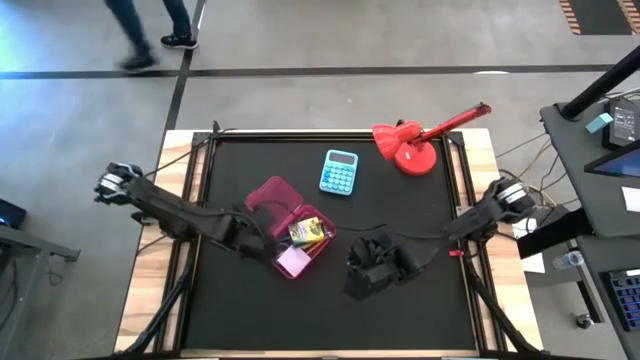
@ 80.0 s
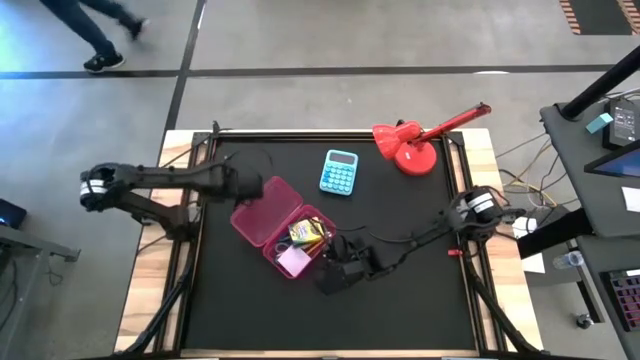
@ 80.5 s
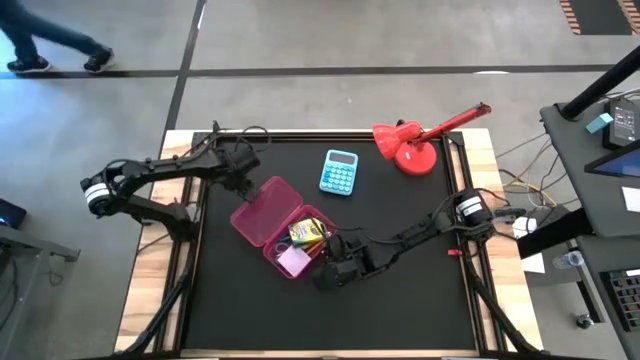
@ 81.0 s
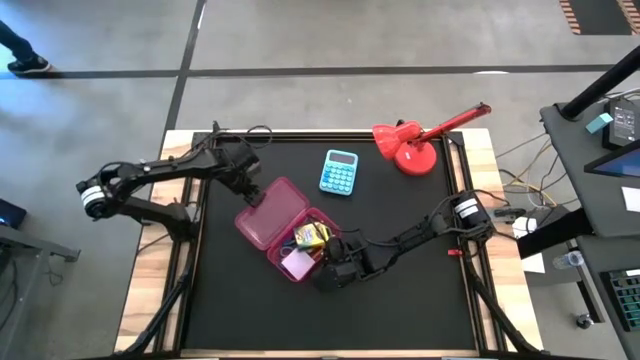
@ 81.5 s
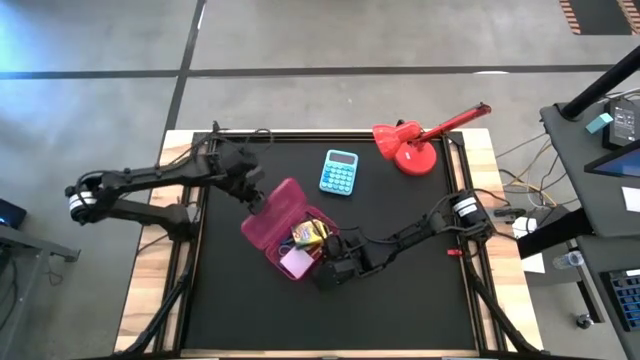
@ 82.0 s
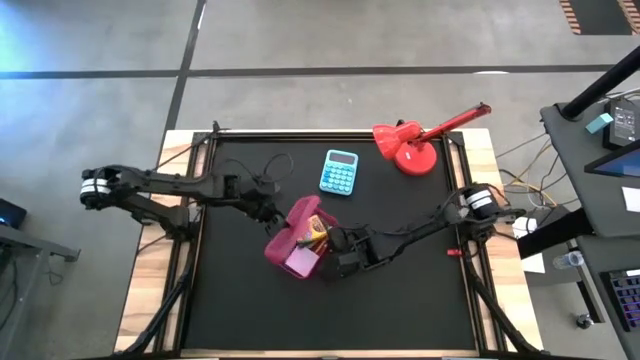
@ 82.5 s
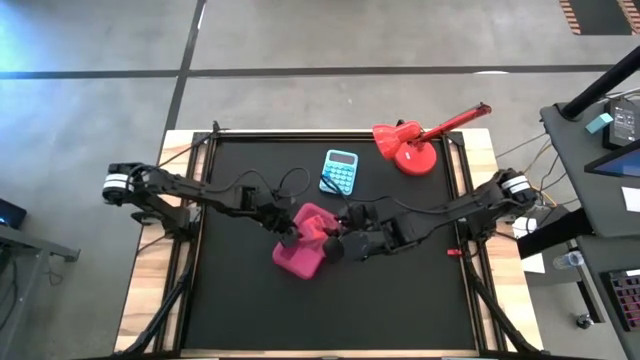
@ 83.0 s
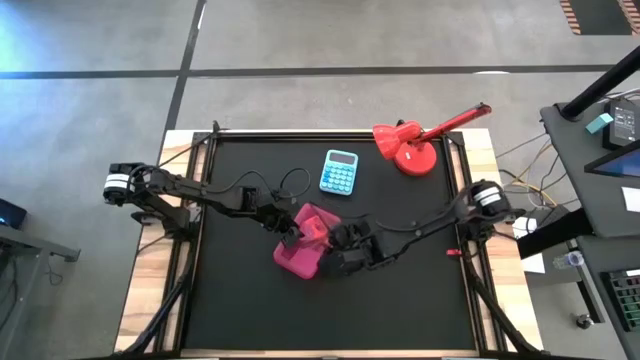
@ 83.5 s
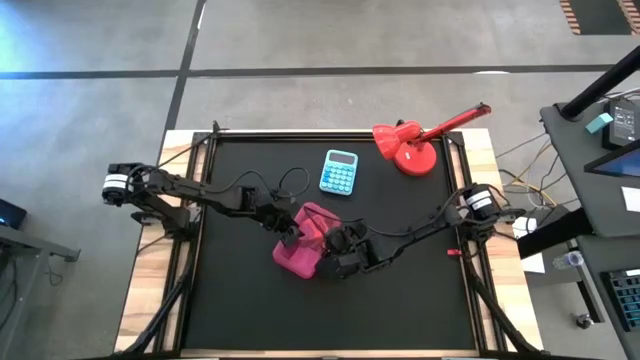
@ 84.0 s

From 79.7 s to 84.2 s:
Task: Pack school essentials
Close the pink supply box

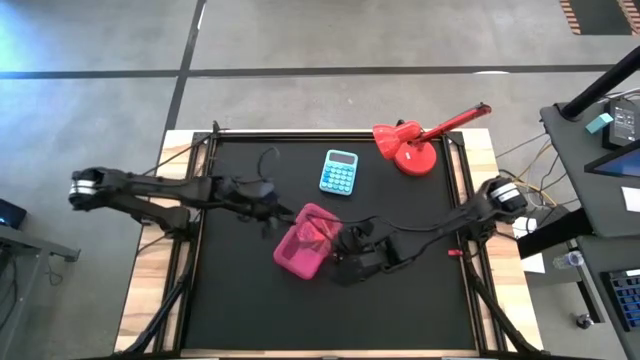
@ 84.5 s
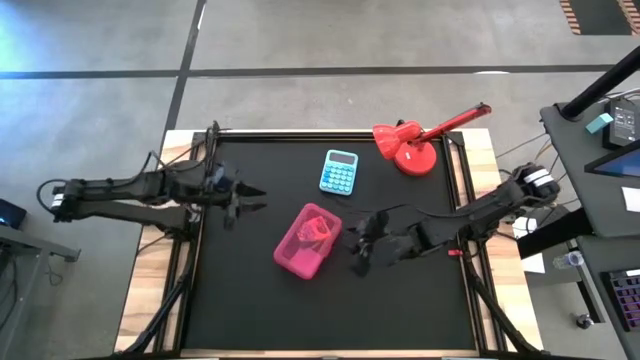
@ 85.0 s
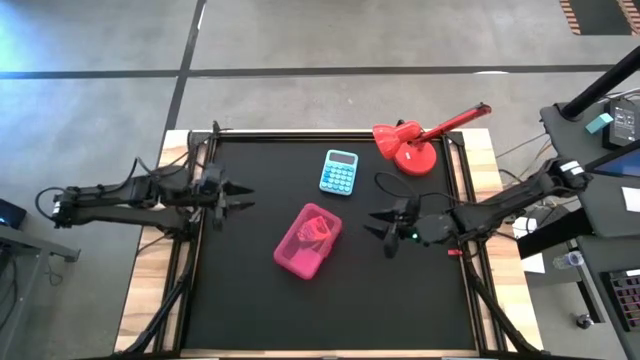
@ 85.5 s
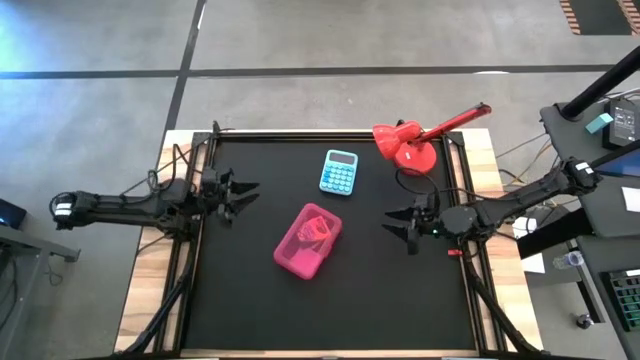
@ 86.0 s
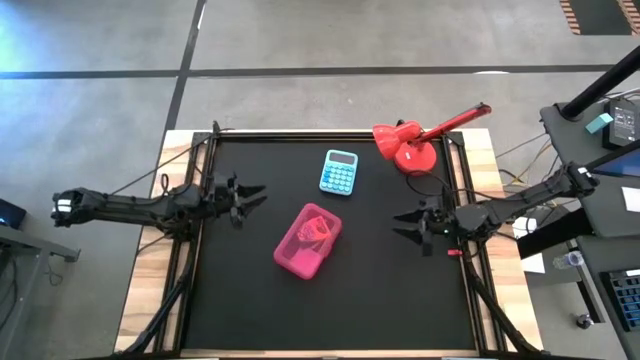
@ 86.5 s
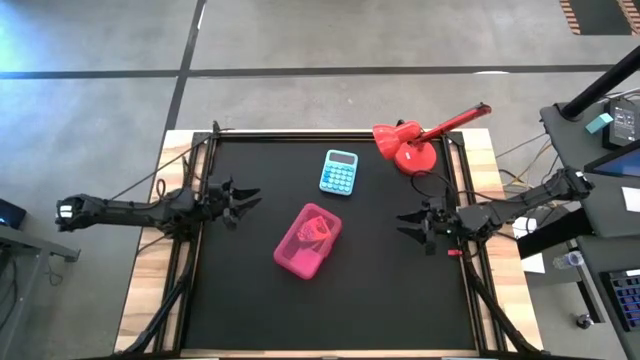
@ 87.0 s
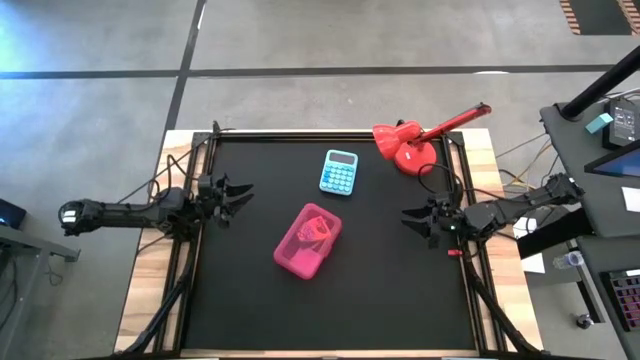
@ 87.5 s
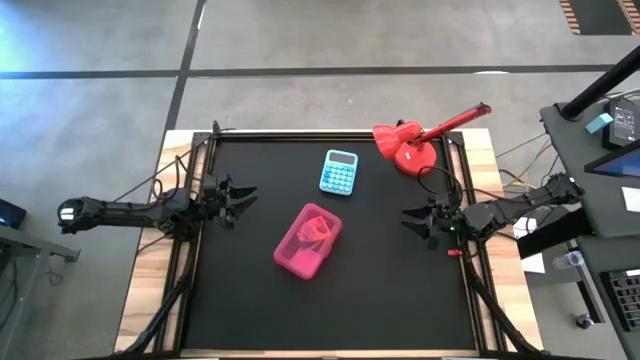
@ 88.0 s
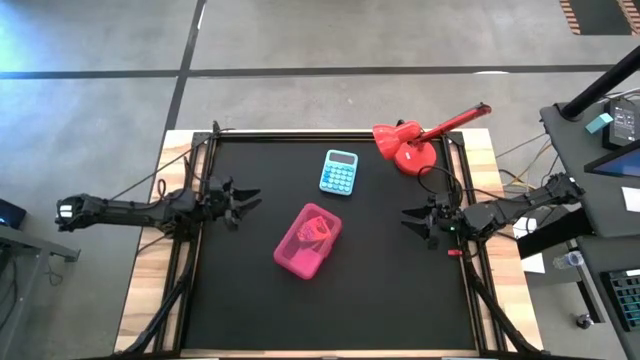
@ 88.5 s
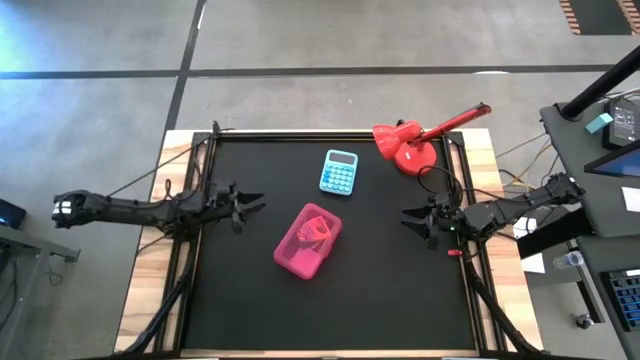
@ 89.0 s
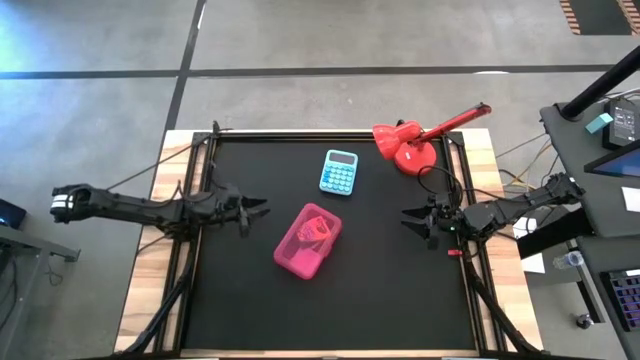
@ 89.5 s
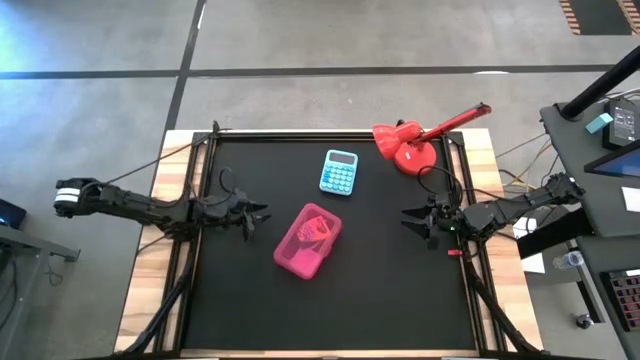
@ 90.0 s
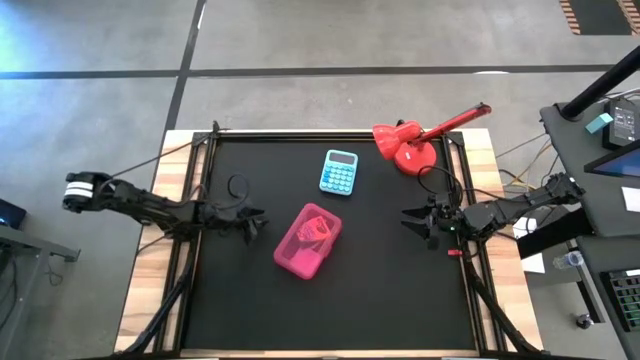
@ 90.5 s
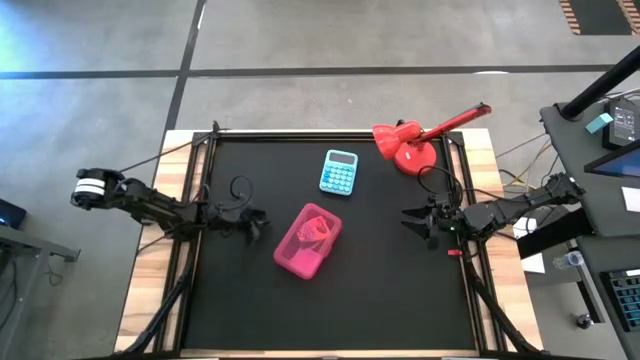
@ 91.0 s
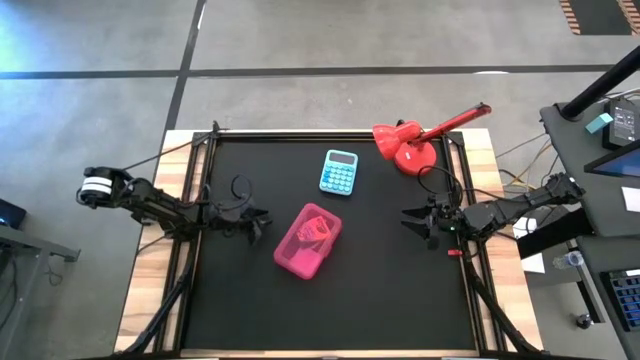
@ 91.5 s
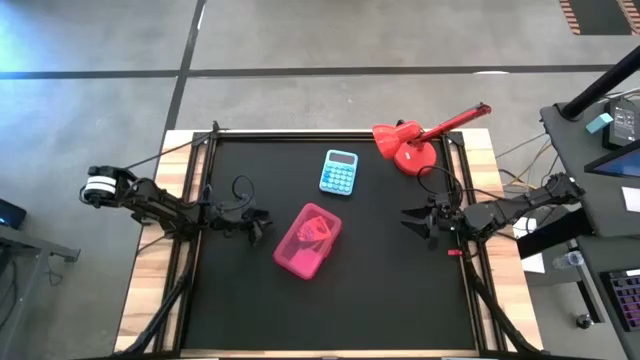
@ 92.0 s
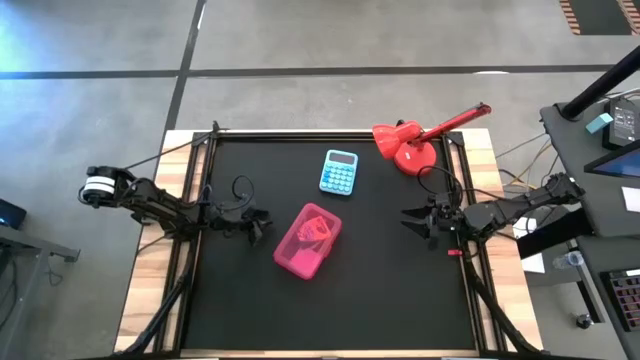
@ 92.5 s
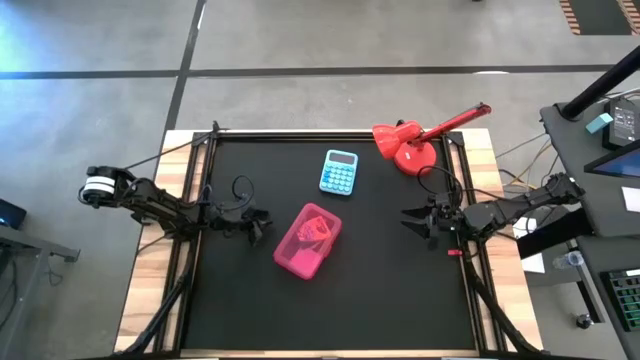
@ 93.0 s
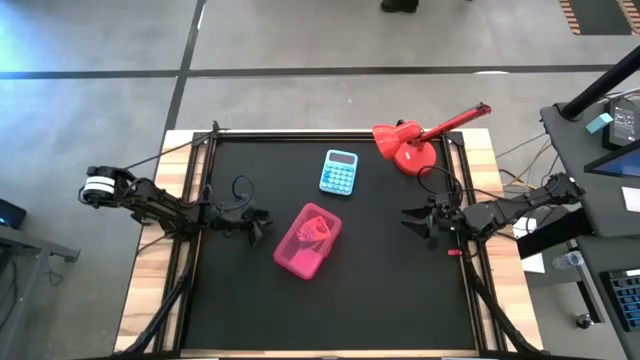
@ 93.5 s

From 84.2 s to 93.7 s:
Return to Home Position

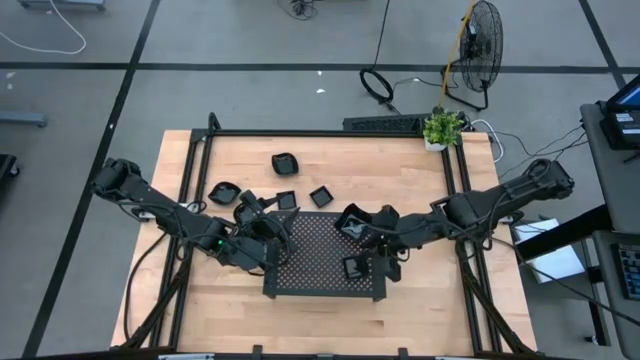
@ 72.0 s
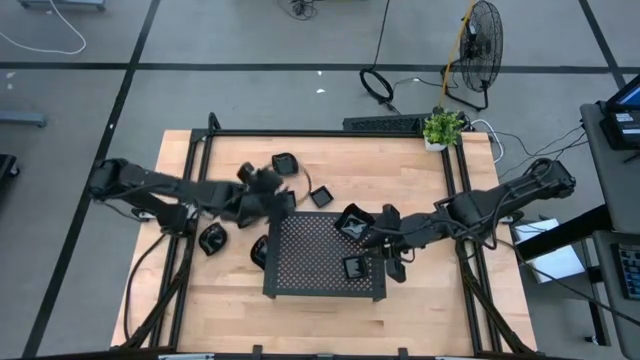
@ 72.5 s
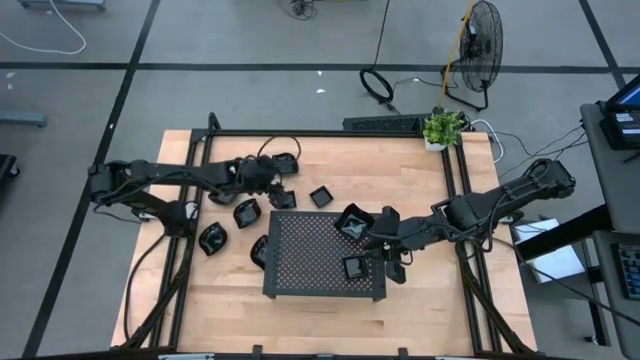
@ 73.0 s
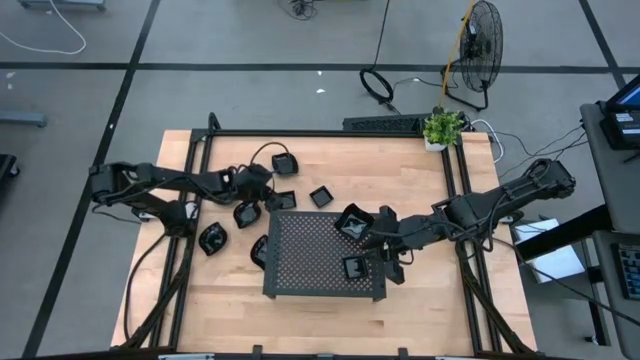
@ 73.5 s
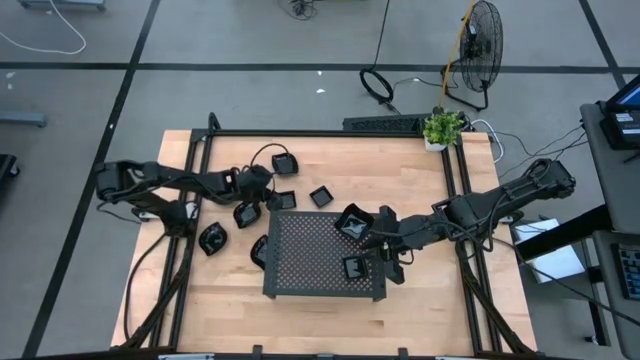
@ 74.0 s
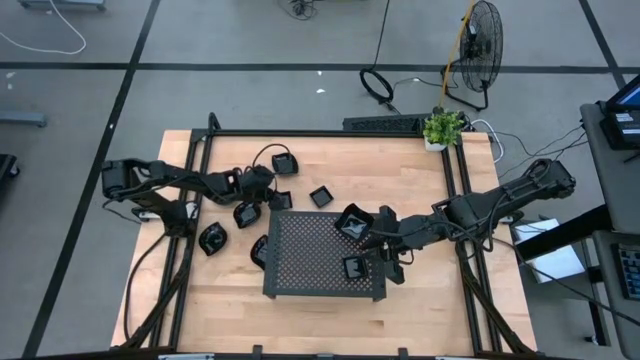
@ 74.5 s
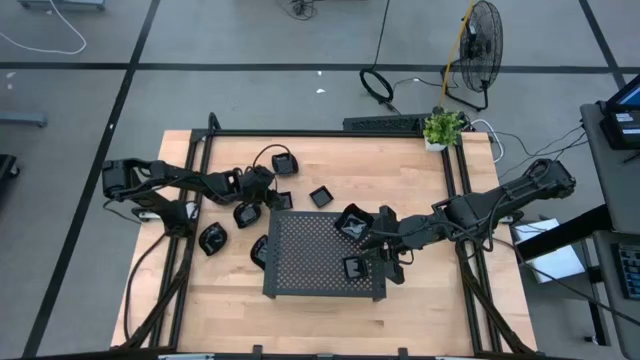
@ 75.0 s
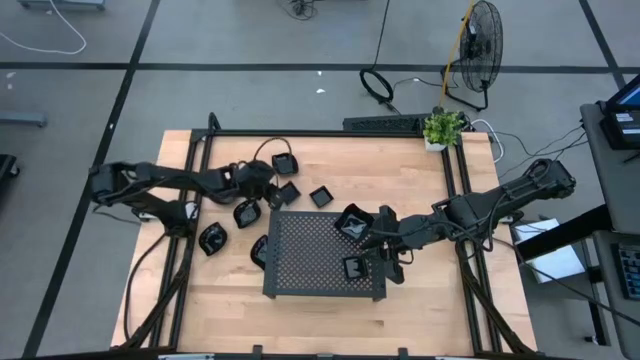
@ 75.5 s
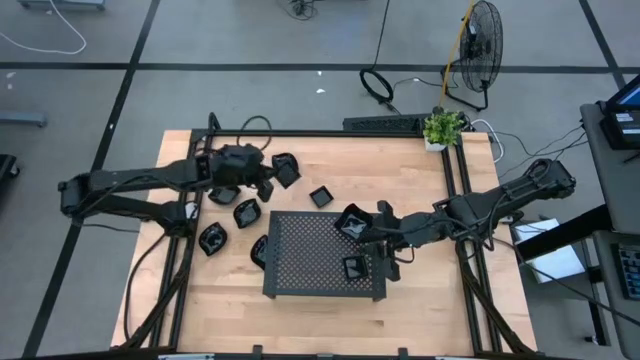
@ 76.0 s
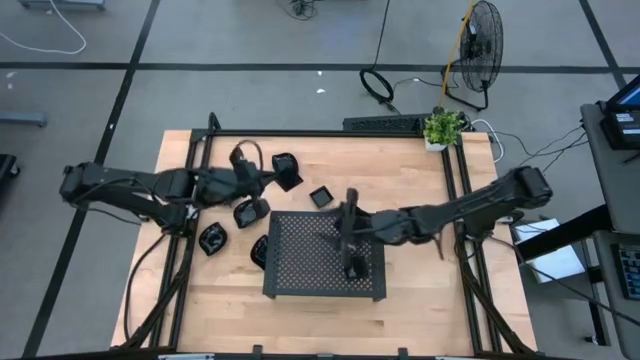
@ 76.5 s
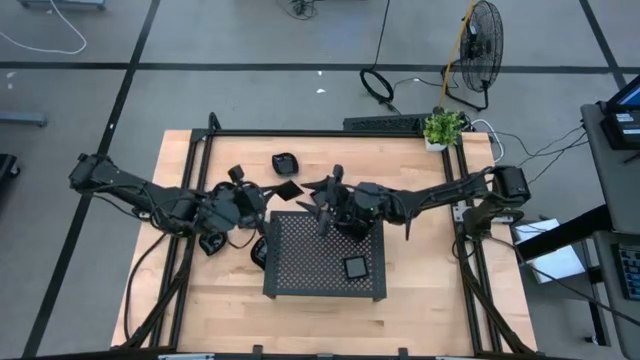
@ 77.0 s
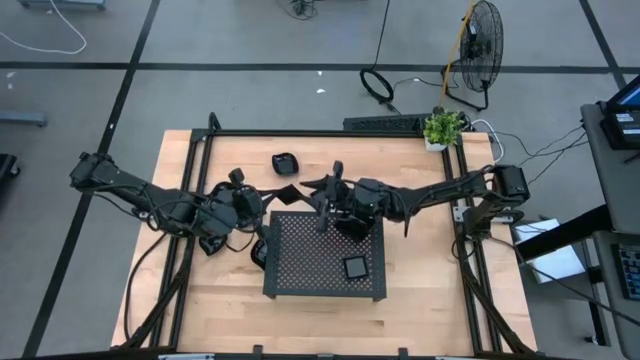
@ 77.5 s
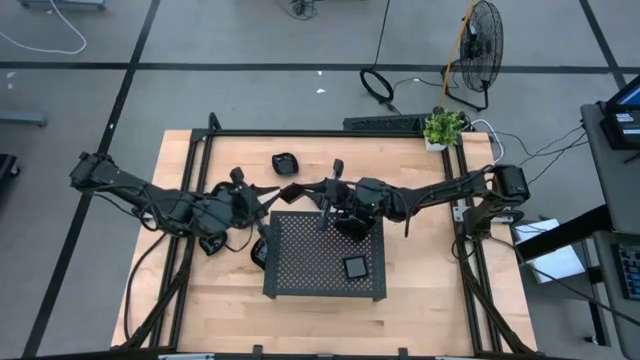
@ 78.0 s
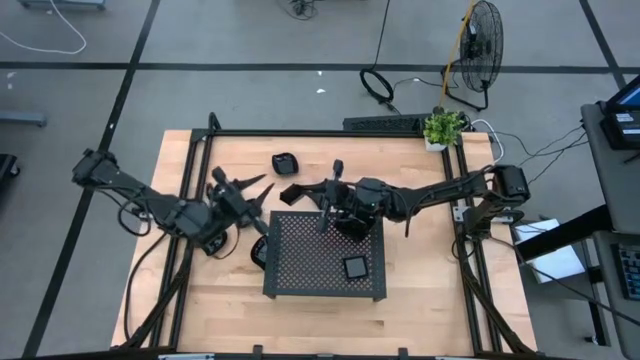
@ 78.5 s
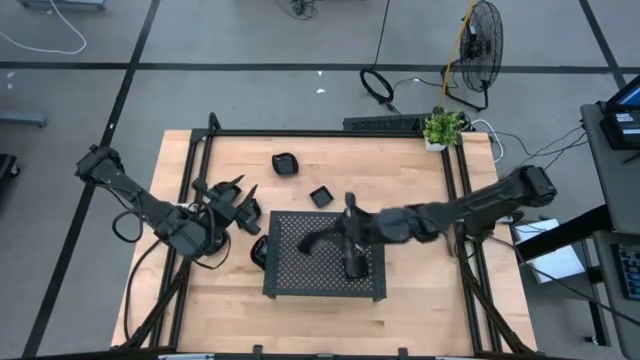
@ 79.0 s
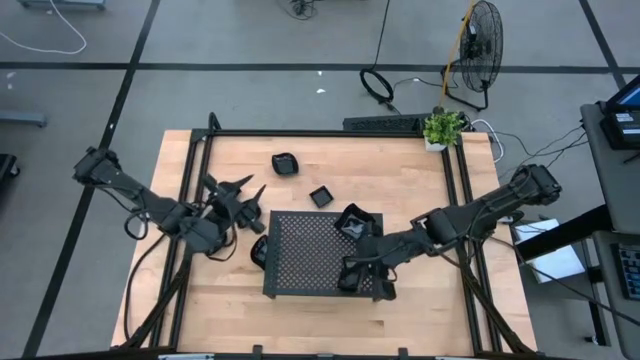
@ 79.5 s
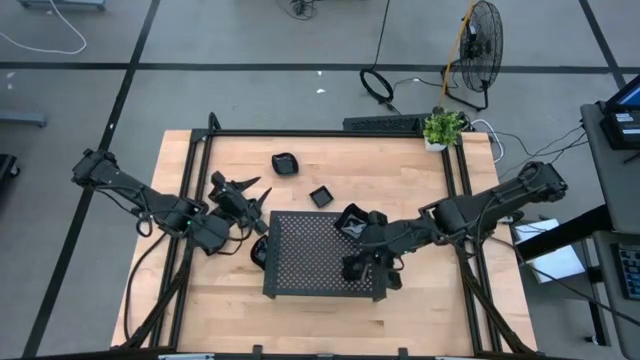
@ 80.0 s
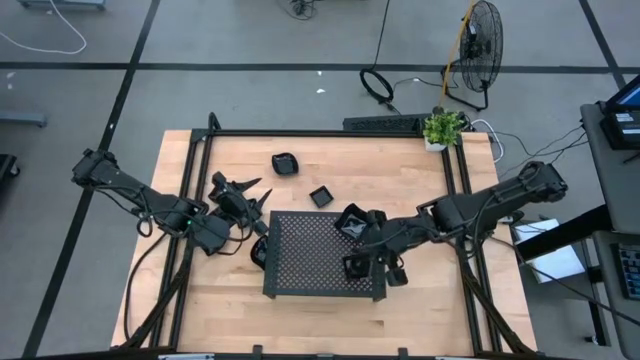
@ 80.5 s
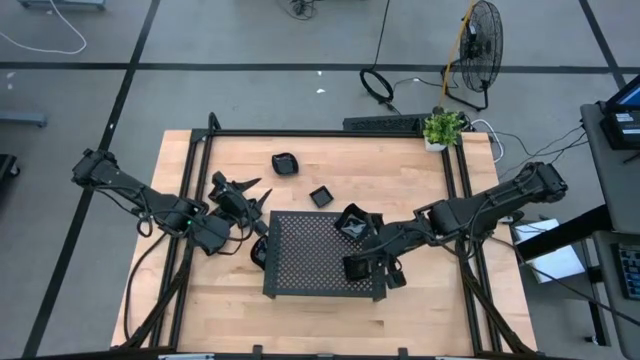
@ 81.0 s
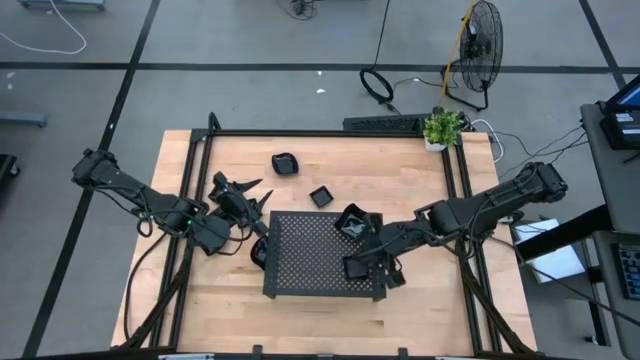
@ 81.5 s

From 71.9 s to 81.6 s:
Task: Pick & Place Mini shaped plates
Stack the black square plate on top of the black square plates on the shelf
